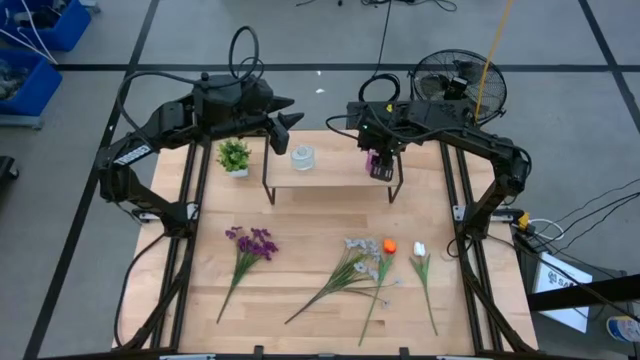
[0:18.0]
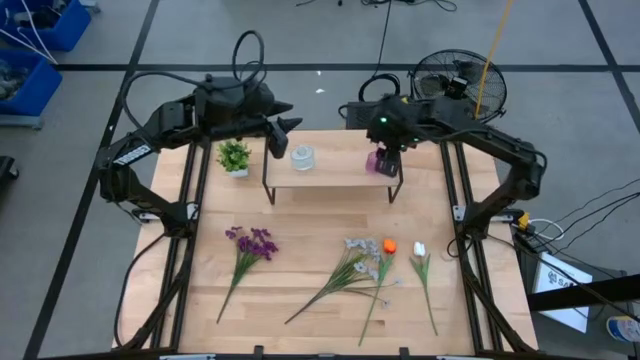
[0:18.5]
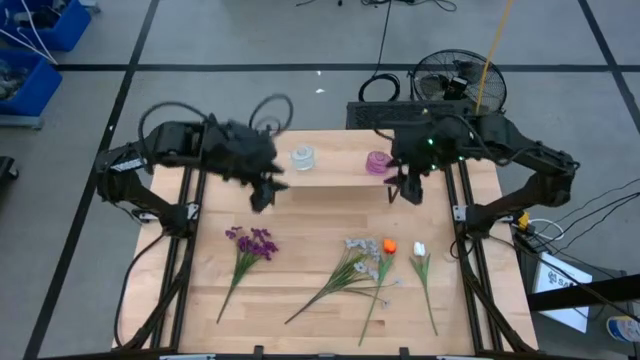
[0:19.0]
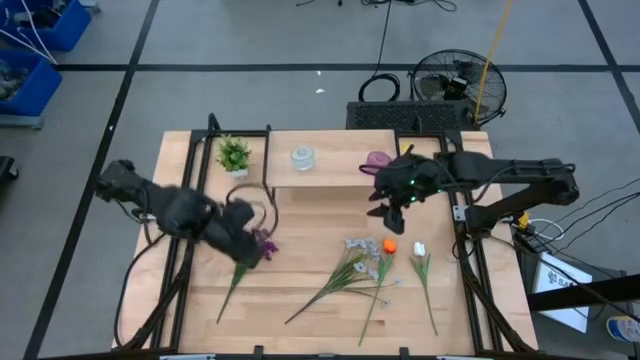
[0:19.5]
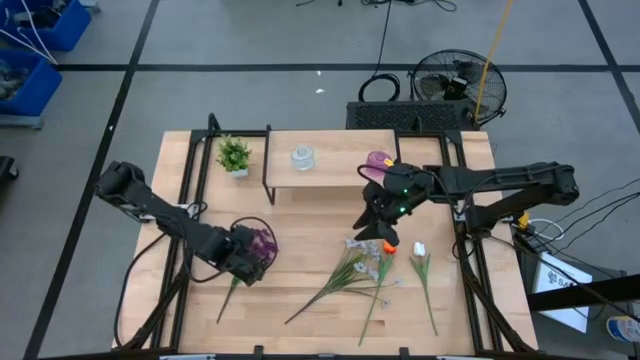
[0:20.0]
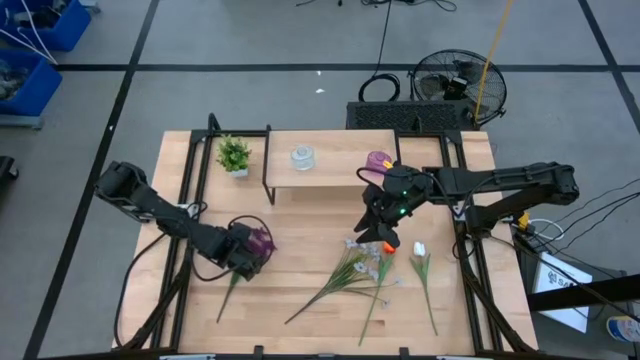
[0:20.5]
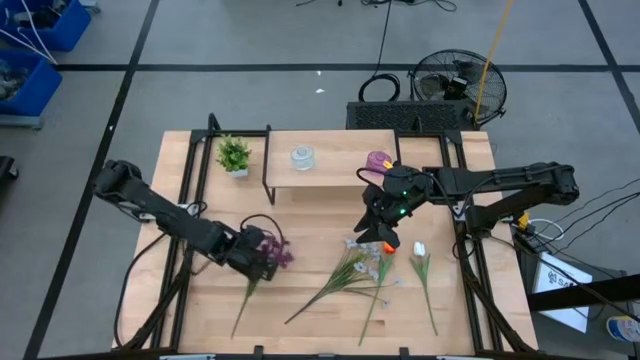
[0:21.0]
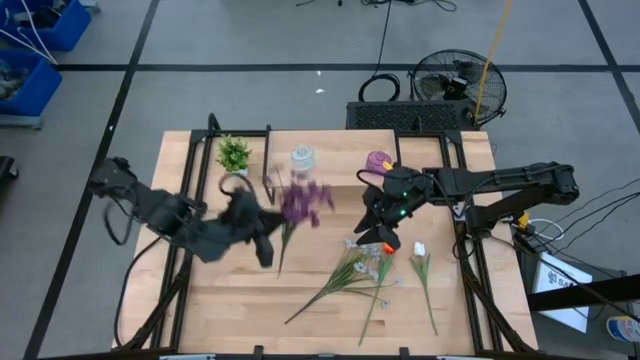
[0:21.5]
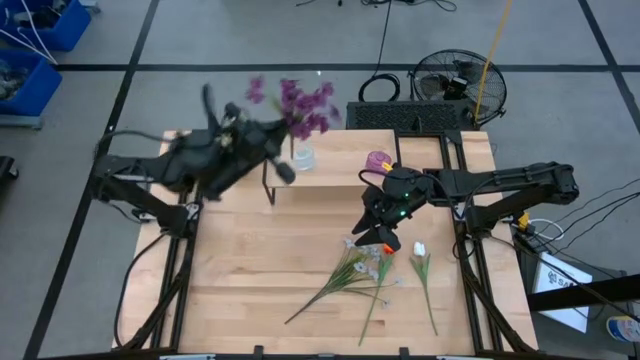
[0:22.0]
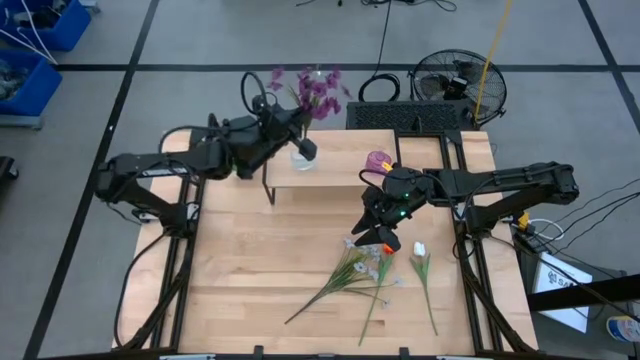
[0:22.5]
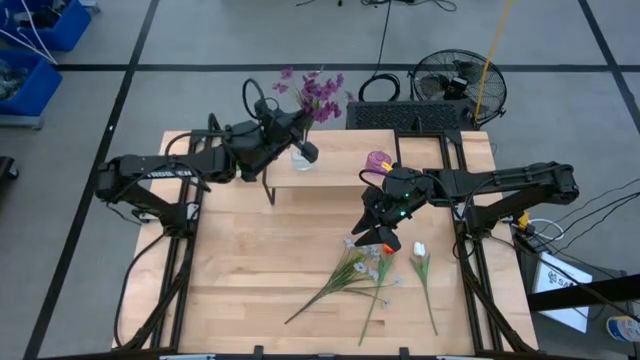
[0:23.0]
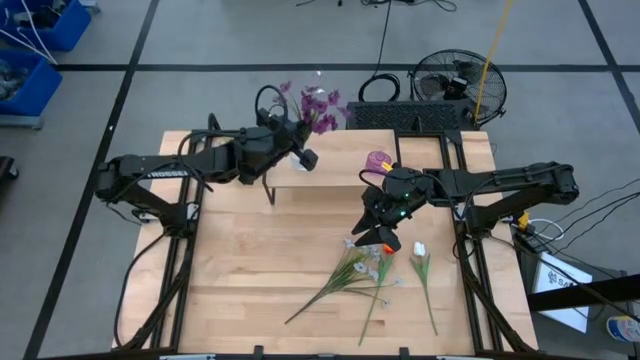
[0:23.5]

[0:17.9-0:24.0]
Task: Pick and place flowers into a vace then onto a shelf
Put the violet flowers into the transparent vase

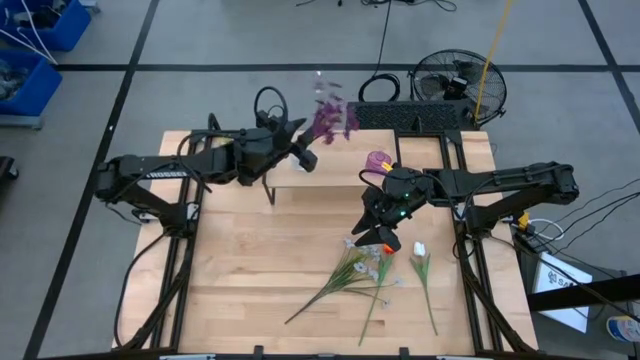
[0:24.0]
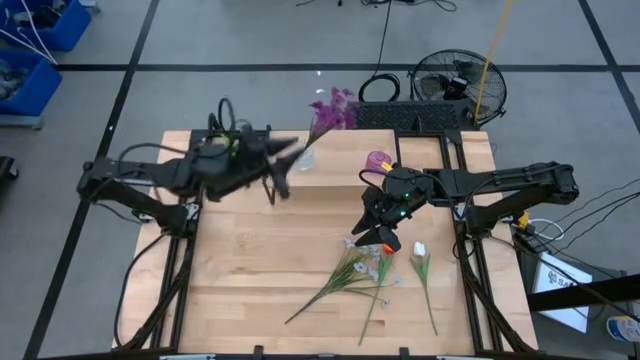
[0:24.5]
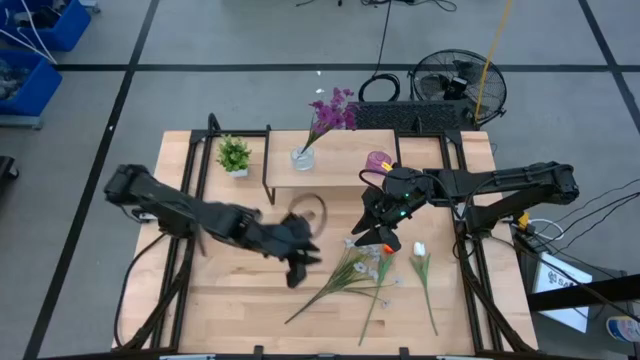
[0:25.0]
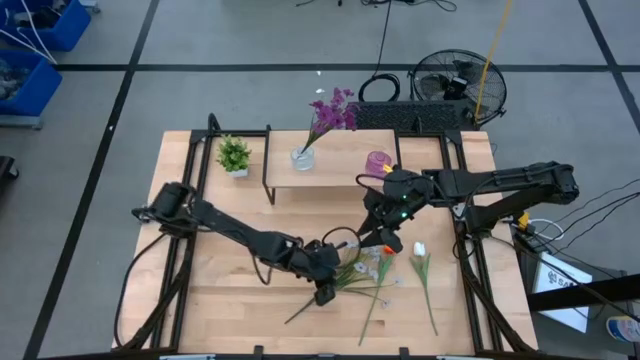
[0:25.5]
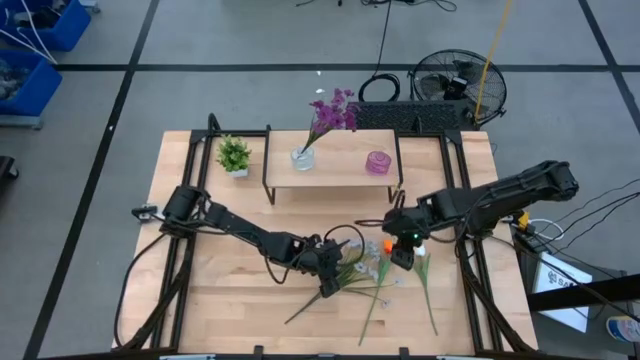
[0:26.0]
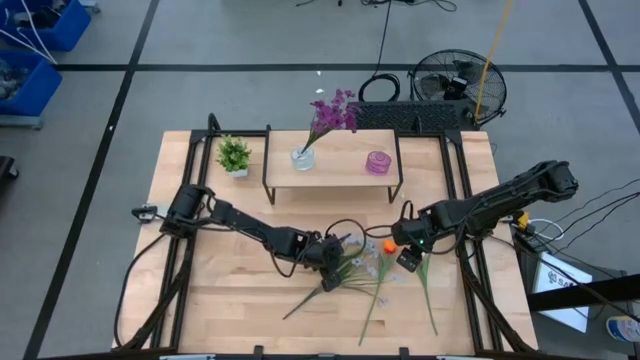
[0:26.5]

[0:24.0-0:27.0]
Put the white flowers into the transparent vase

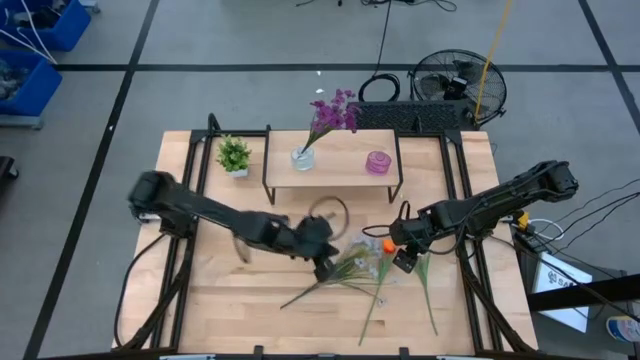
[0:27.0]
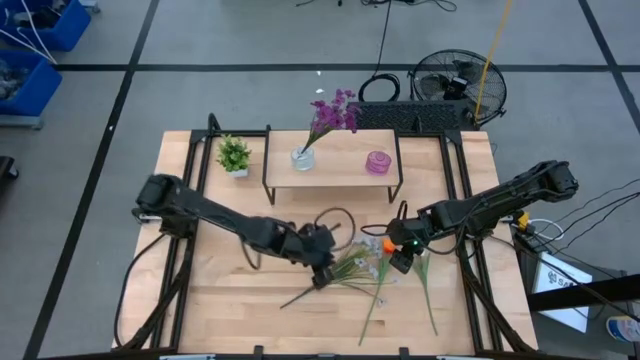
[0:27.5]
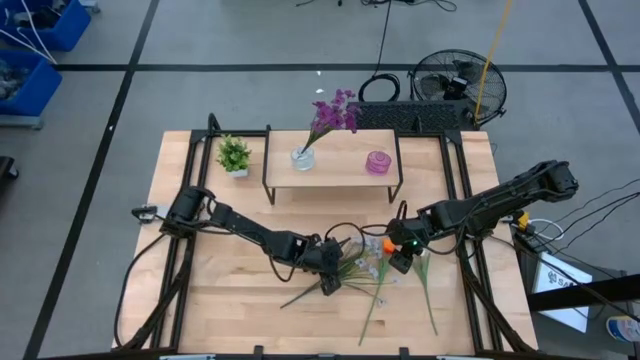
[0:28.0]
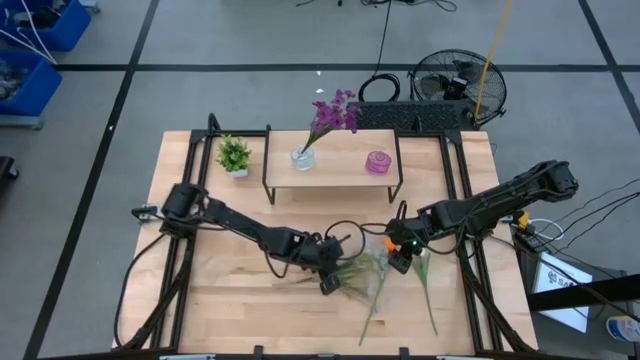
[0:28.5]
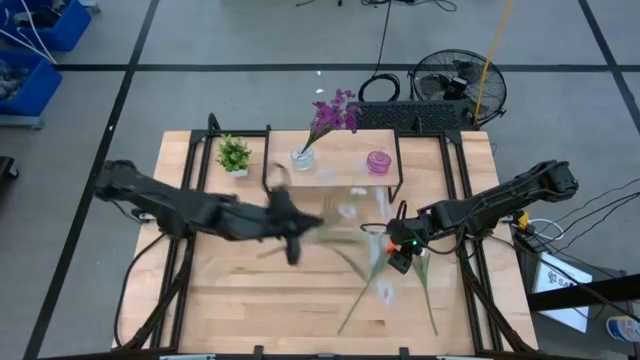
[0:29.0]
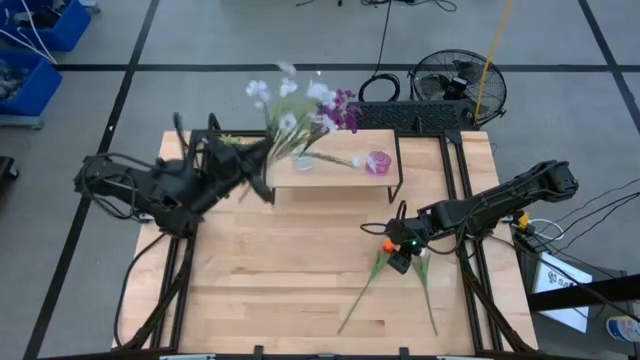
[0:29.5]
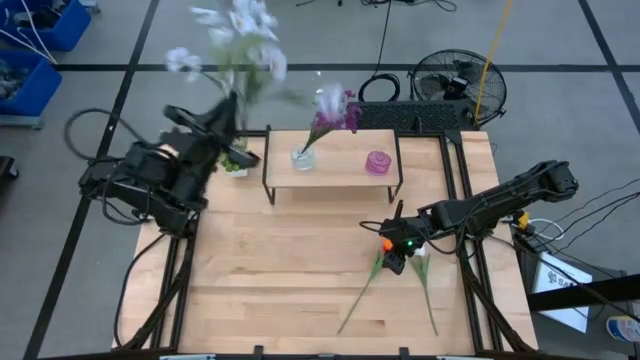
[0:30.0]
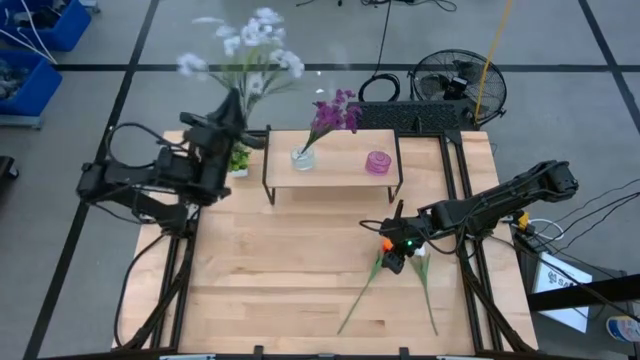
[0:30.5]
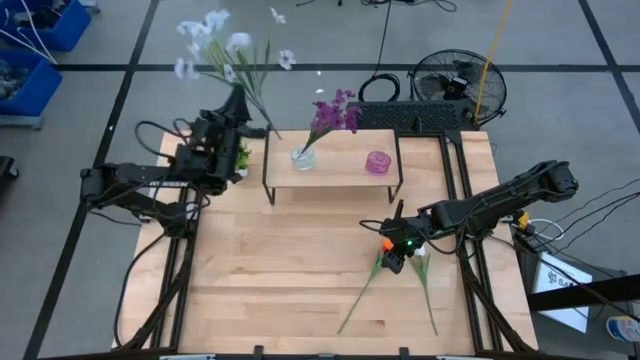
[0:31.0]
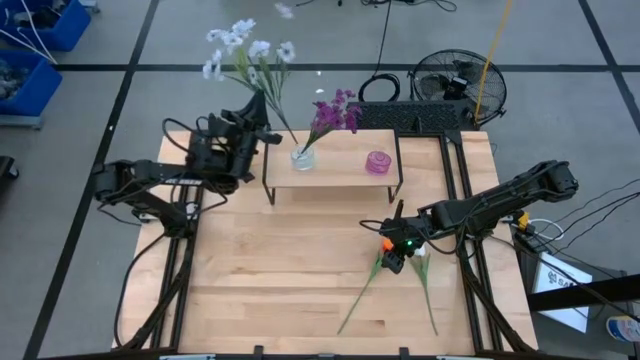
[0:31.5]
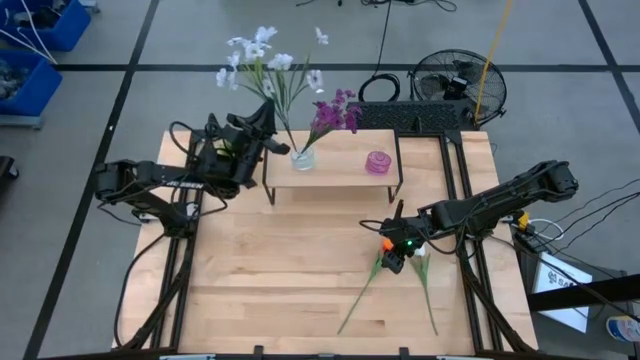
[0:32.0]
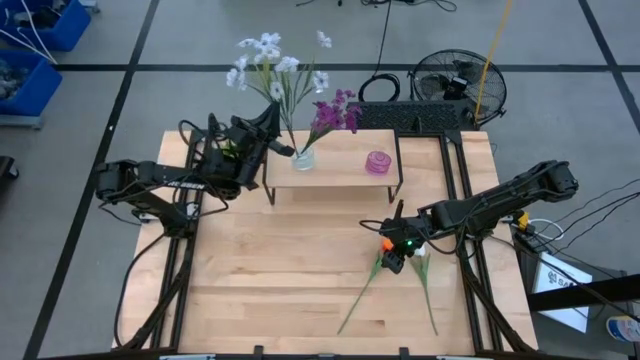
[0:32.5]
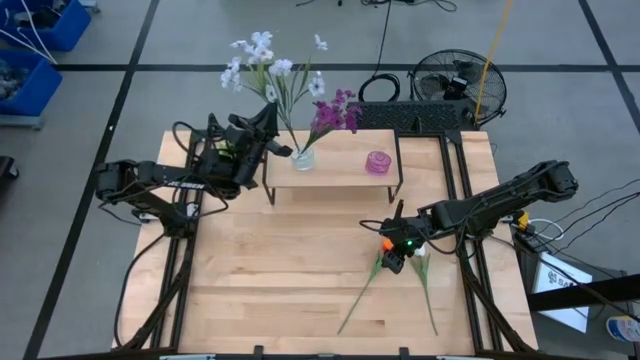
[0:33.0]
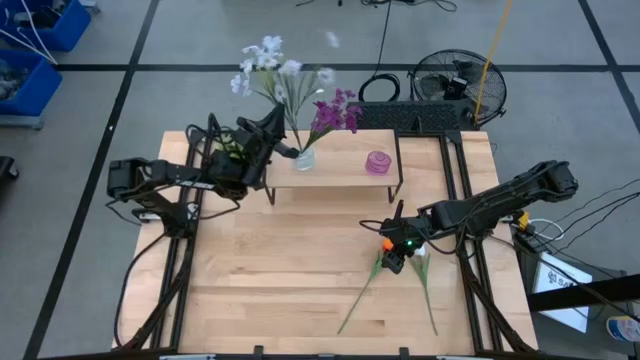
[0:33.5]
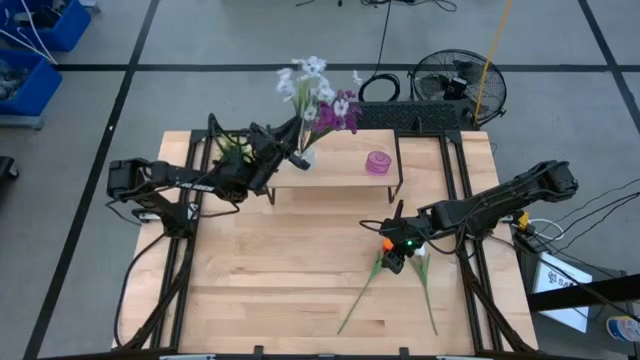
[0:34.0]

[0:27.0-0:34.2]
Put the white flowers into the transparent vase

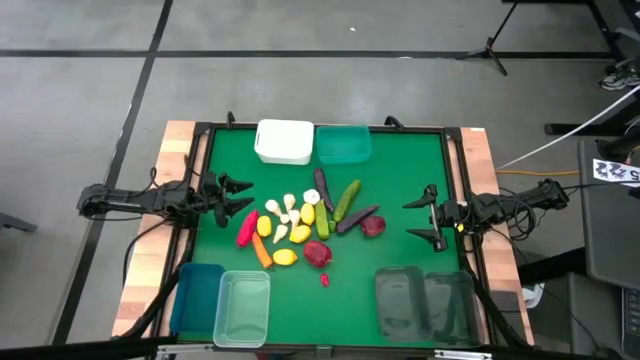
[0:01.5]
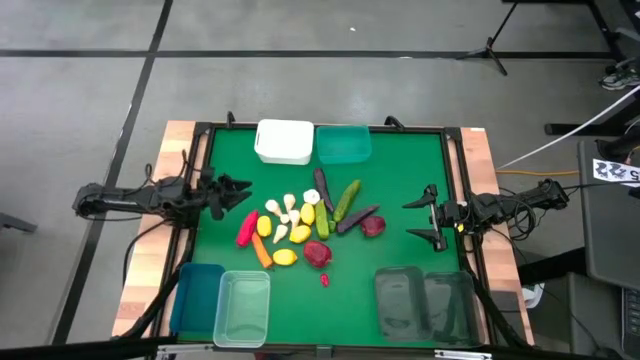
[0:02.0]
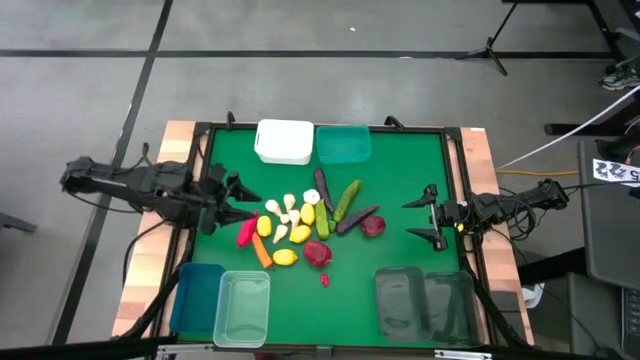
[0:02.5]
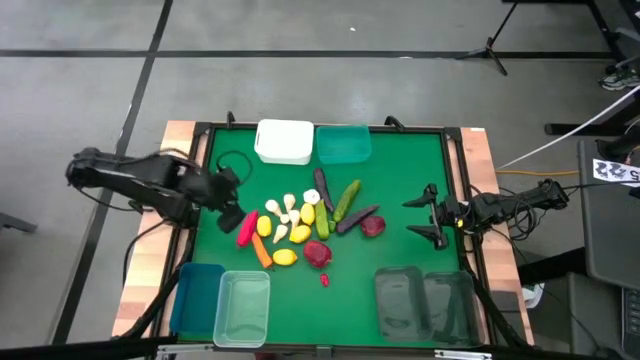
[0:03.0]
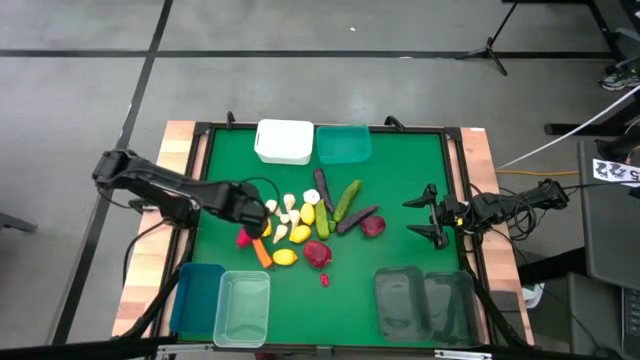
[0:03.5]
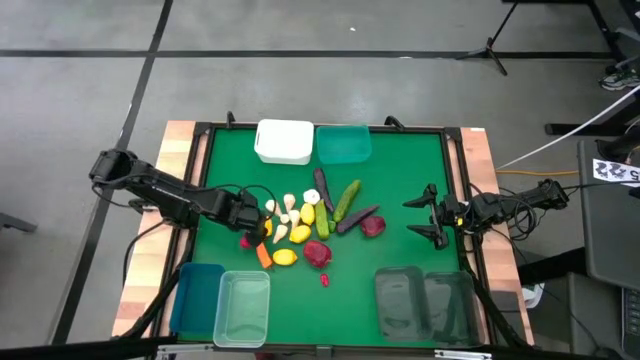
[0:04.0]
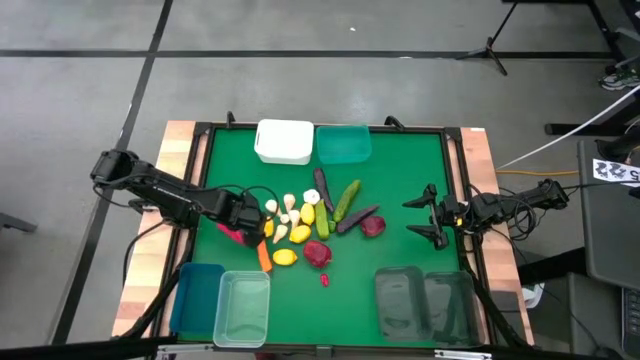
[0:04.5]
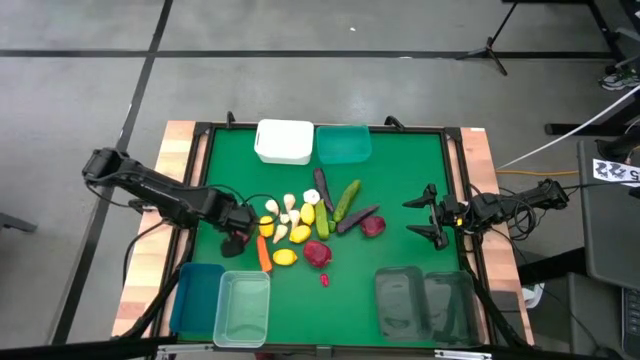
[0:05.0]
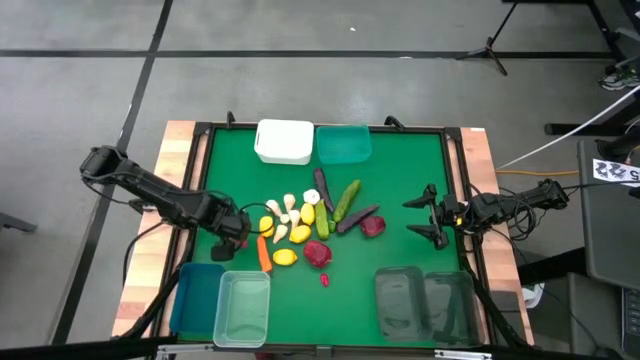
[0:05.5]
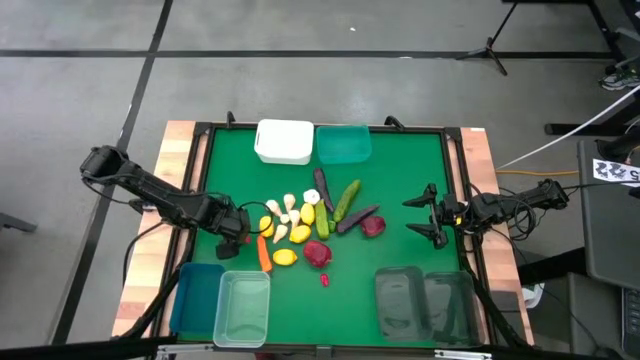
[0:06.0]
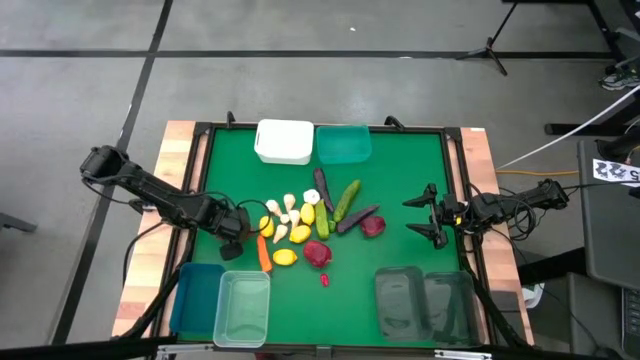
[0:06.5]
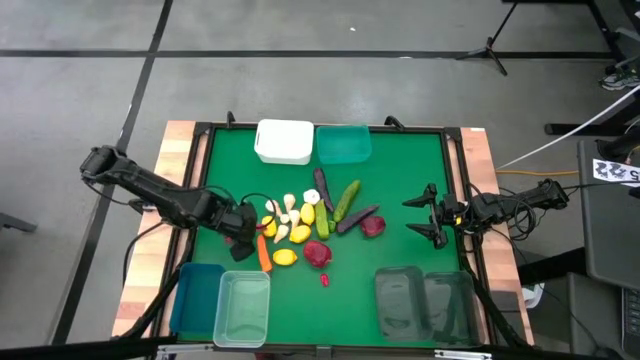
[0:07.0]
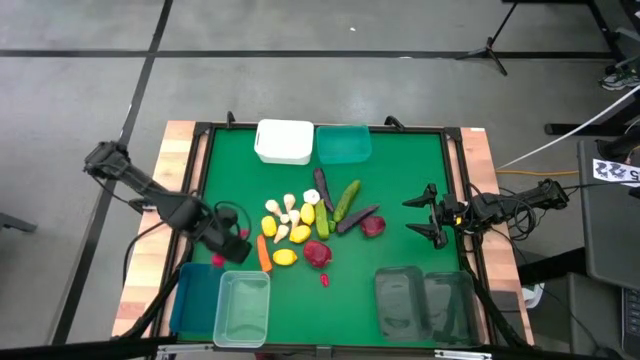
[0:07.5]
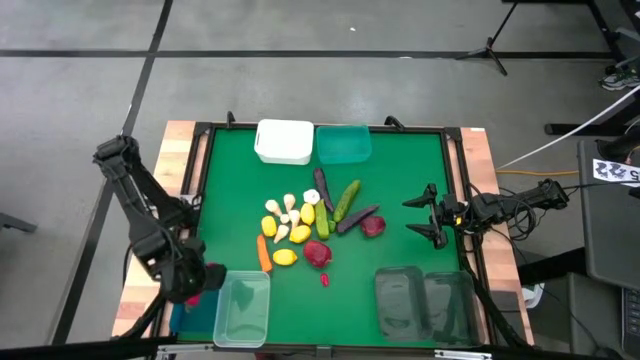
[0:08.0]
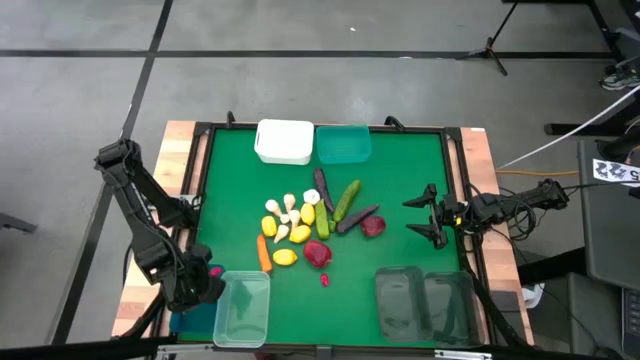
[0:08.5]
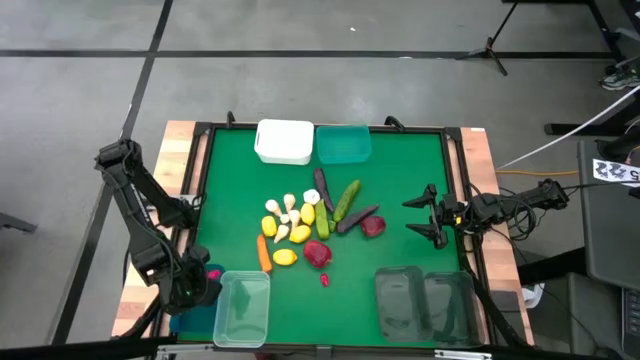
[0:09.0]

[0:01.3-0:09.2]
Task: Sort produce into baskets
Put the red chili pepper into the blue bin
